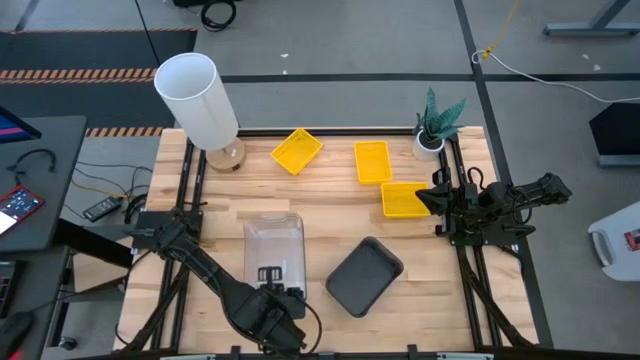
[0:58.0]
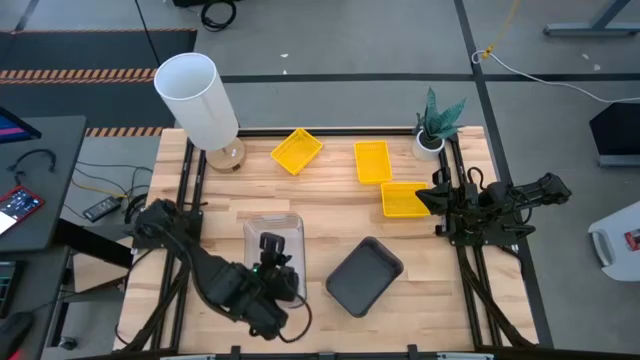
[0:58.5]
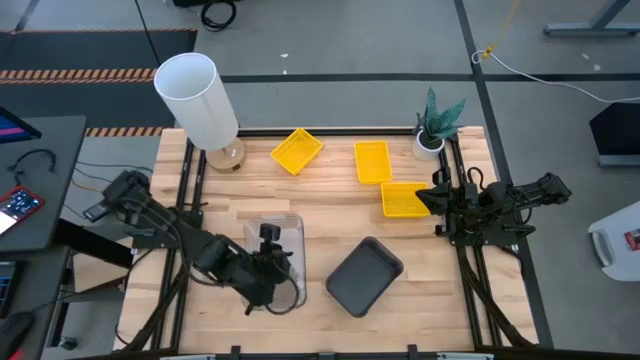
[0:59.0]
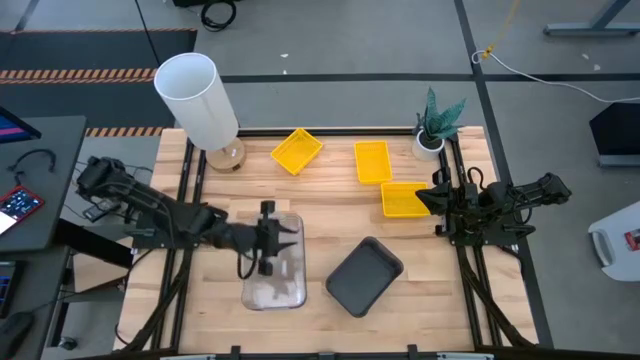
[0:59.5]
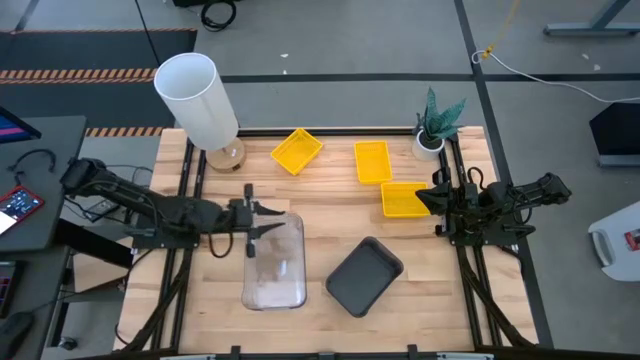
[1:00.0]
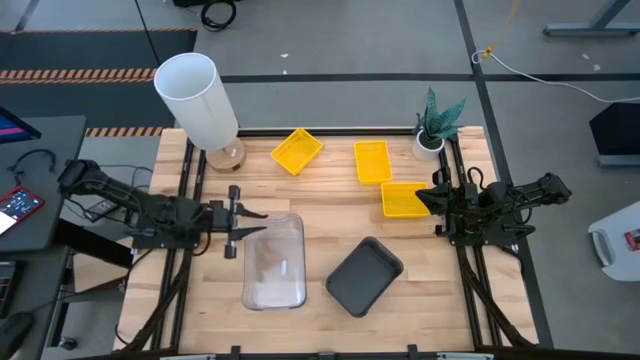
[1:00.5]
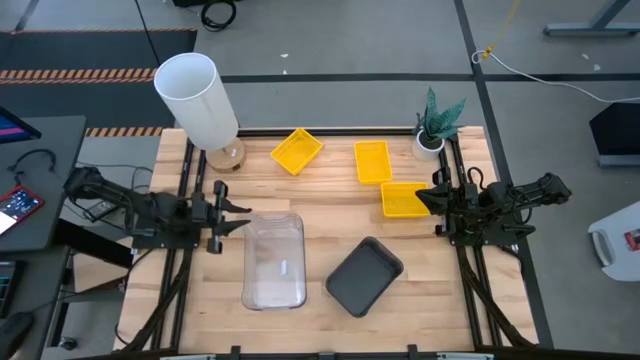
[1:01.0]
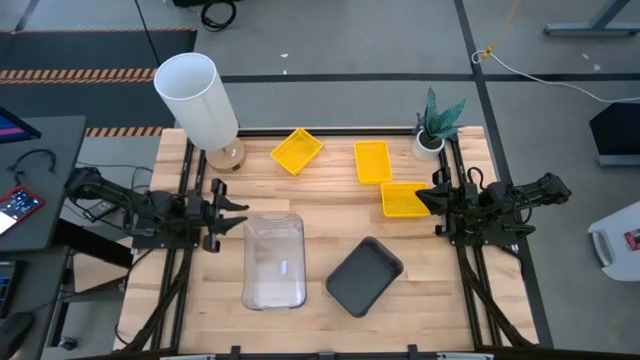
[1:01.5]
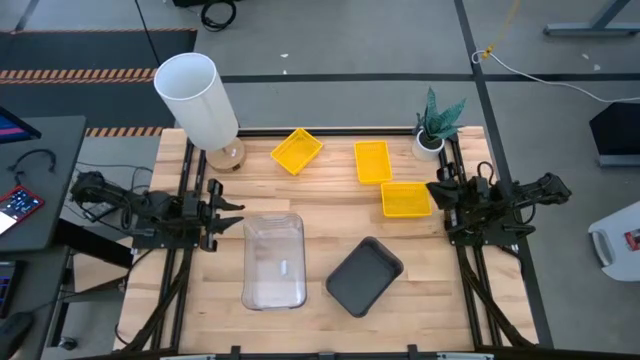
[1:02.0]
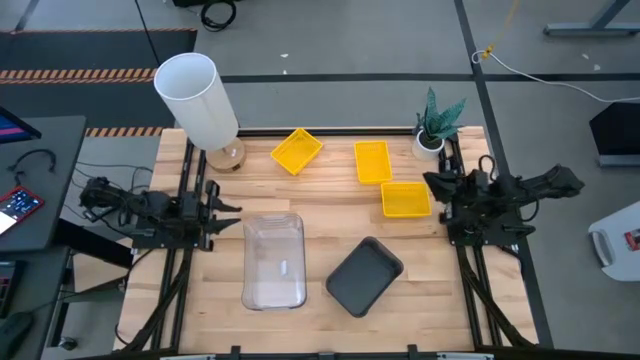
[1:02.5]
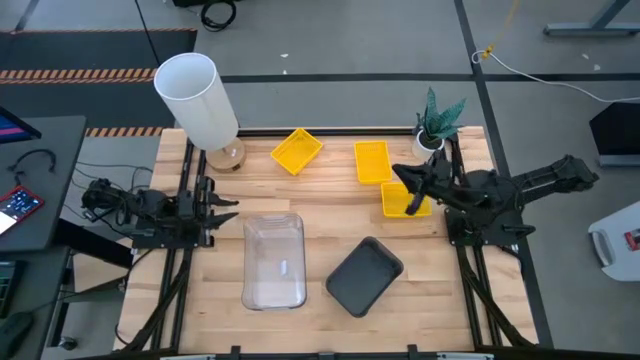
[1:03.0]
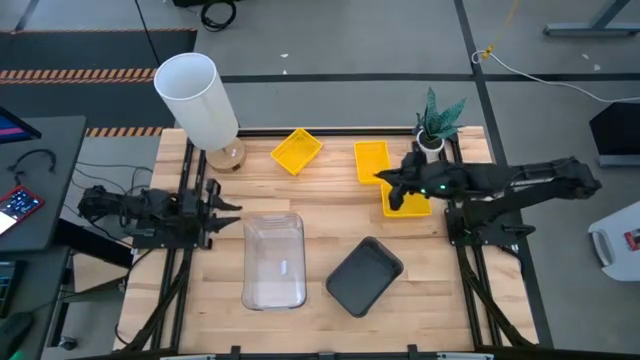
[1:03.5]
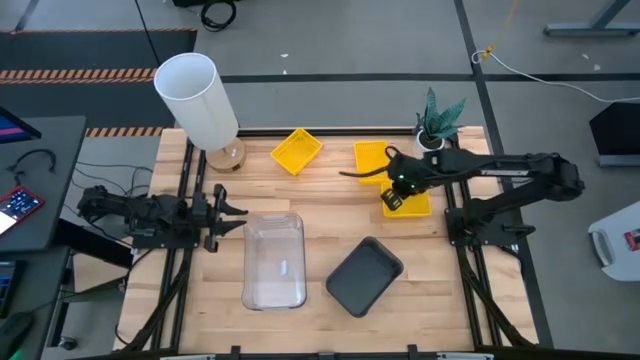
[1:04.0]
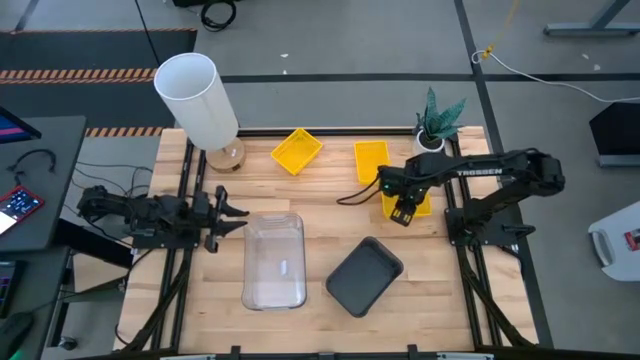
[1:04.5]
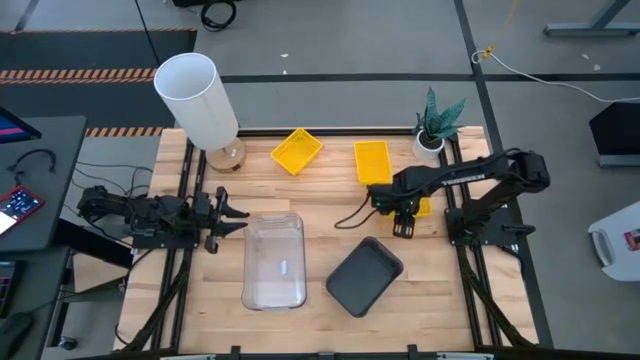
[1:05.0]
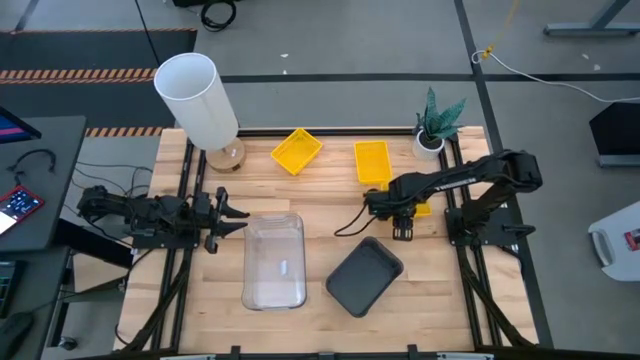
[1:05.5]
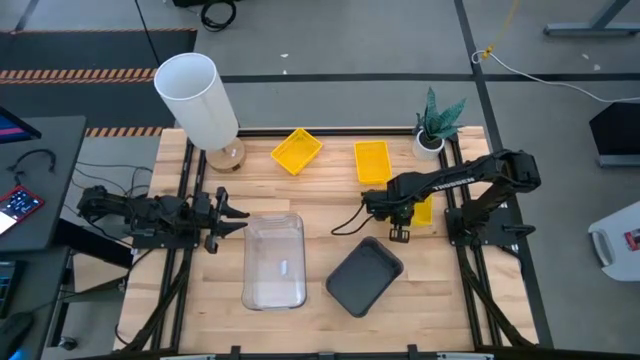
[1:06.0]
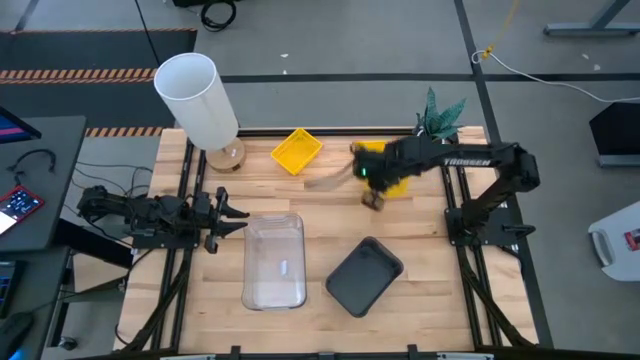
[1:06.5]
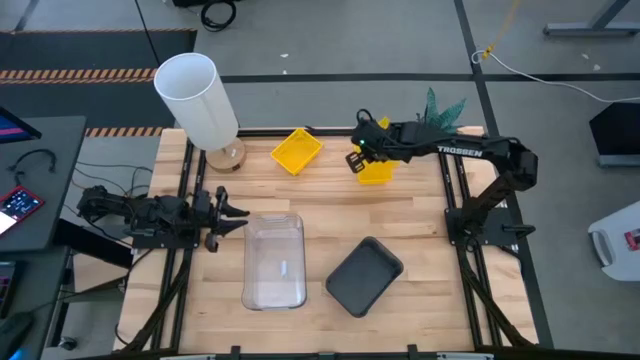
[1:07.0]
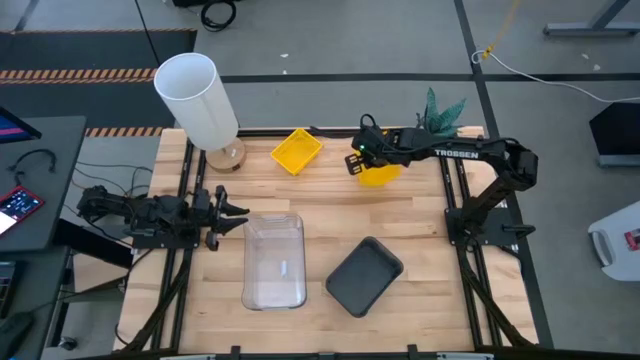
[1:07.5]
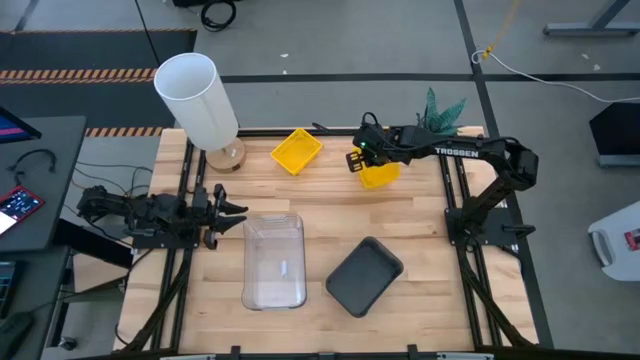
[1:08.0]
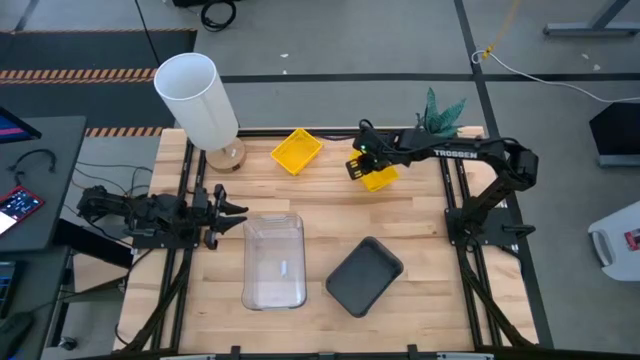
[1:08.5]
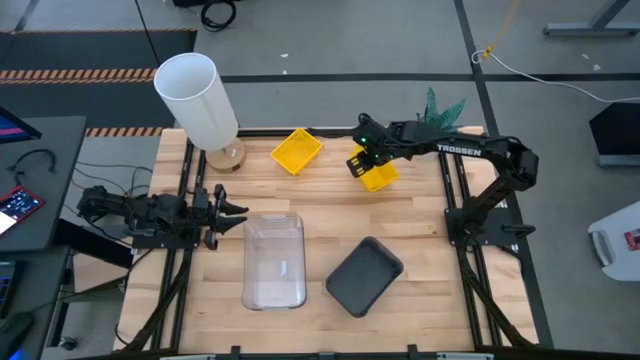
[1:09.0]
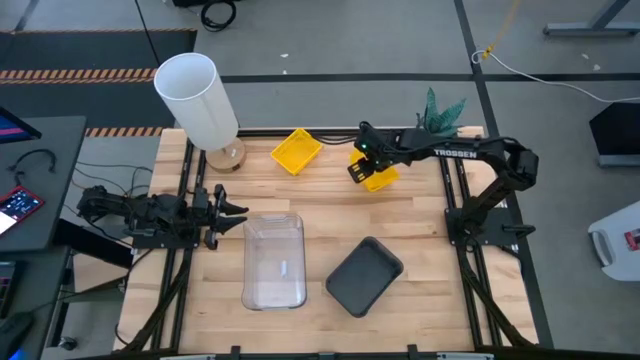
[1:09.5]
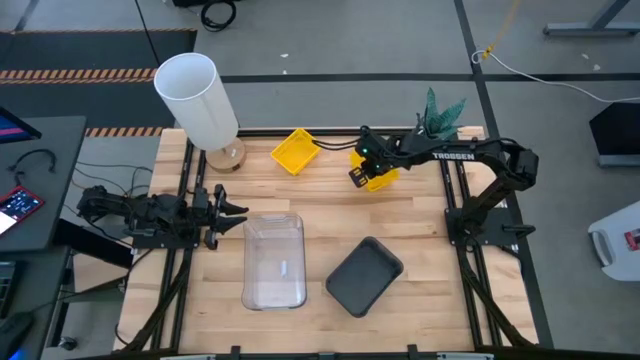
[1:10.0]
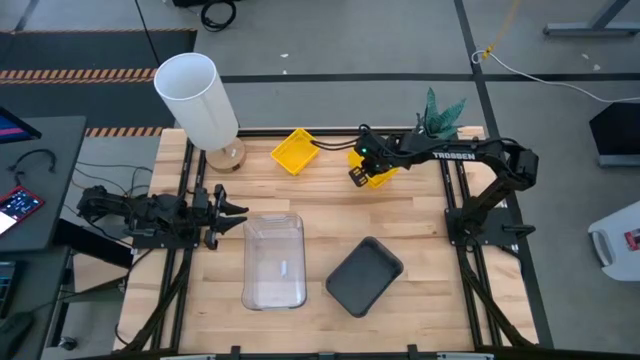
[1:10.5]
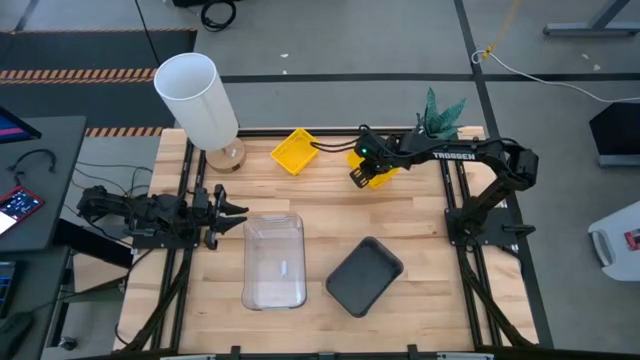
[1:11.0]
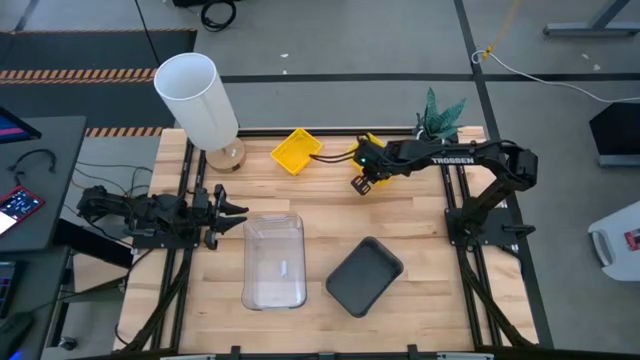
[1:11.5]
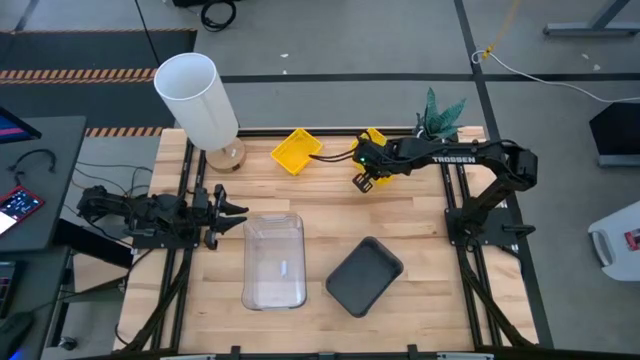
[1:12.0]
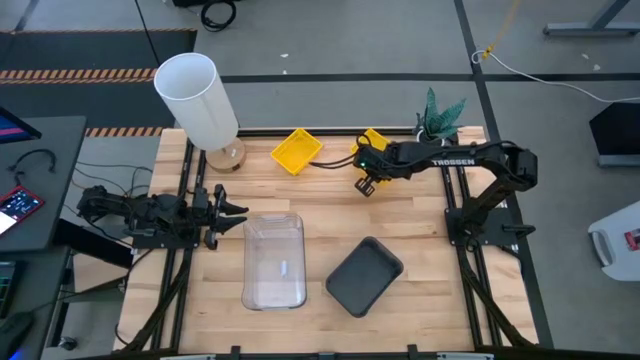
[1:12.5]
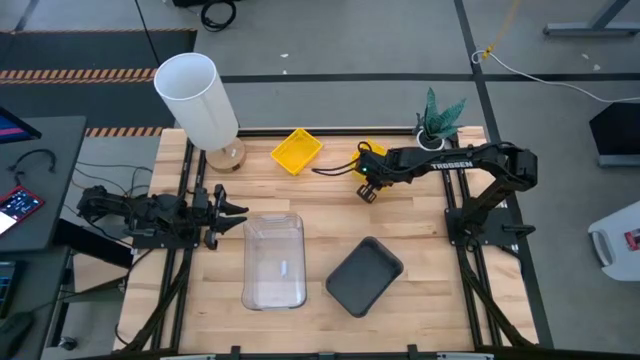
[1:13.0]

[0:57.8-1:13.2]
Stack the bottom right yellow bin into the top yellow bin

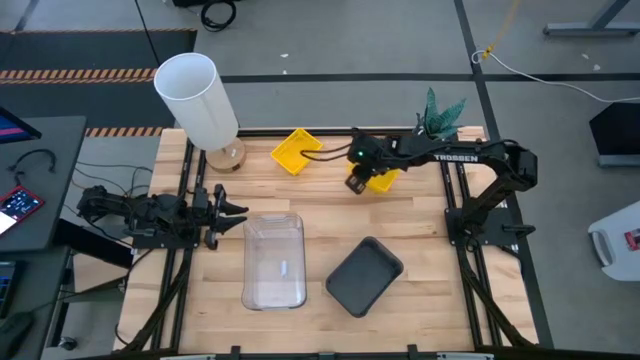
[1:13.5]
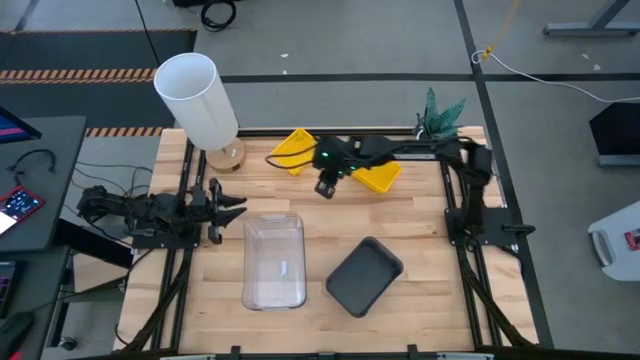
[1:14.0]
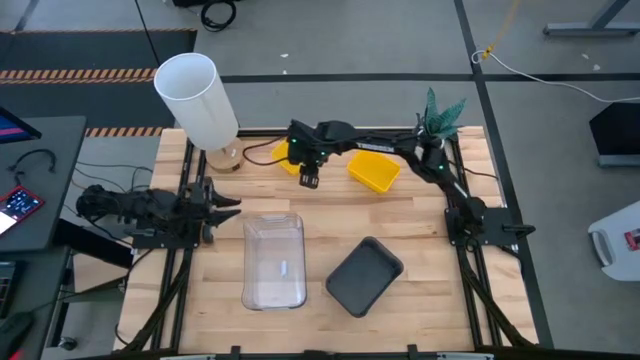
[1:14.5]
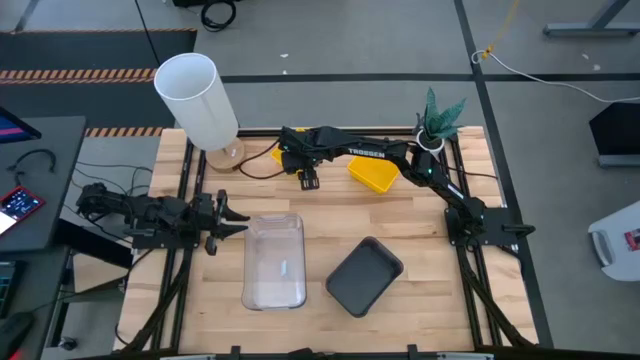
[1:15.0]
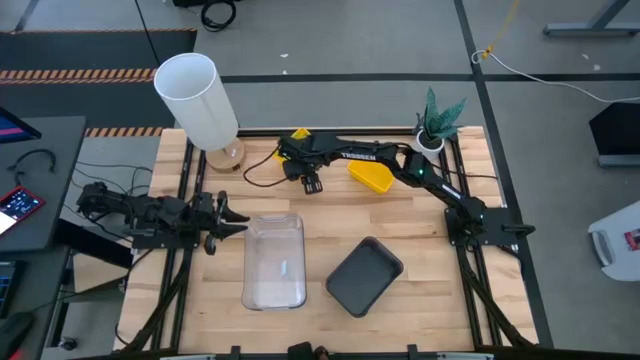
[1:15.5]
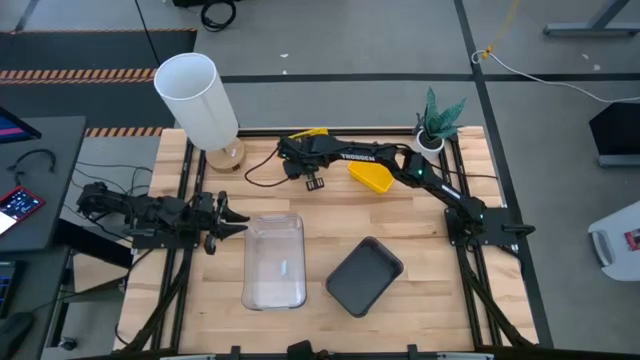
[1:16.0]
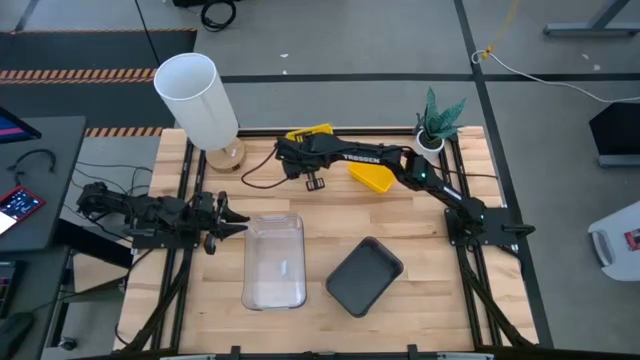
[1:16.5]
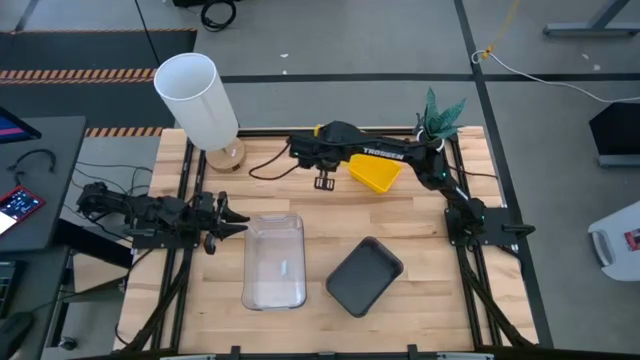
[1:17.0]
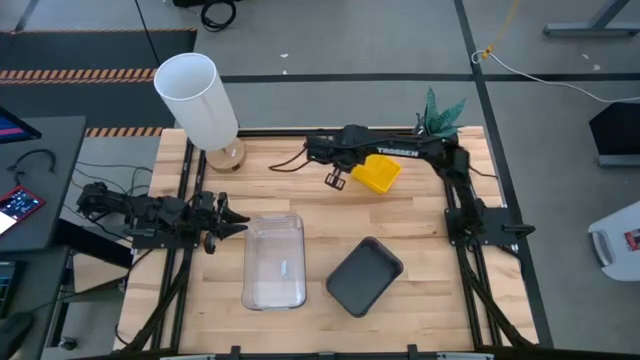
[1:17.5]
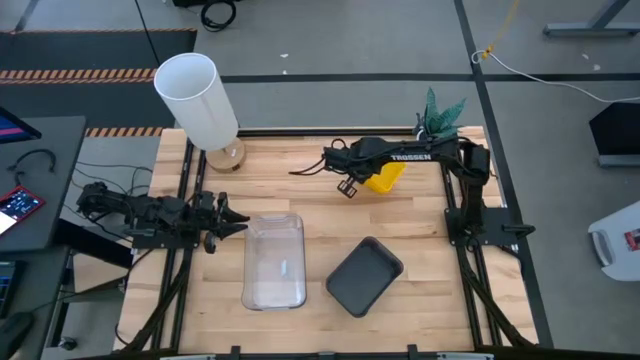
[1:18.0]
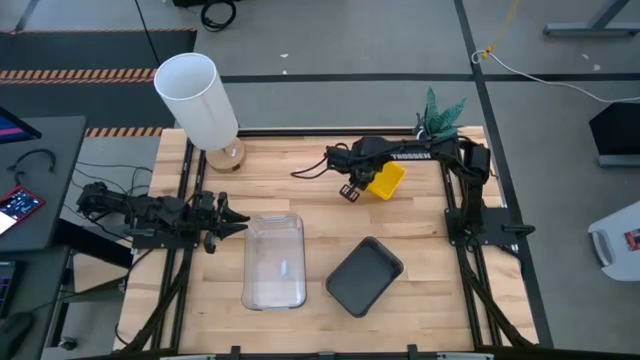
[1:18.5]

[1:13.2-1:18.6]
Stack the left yellow basket into the yellow bin
